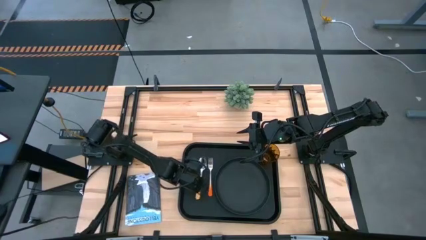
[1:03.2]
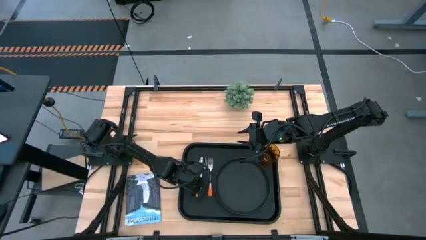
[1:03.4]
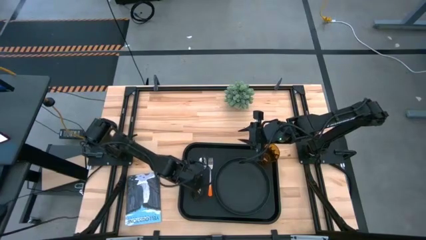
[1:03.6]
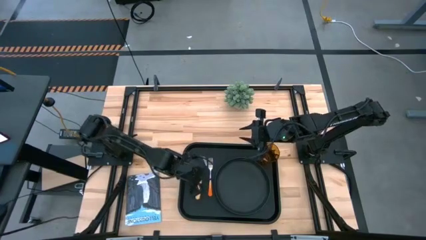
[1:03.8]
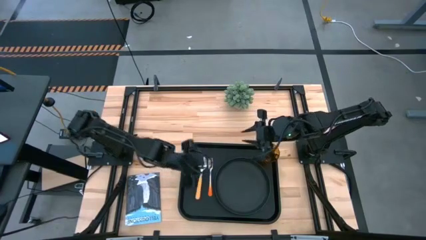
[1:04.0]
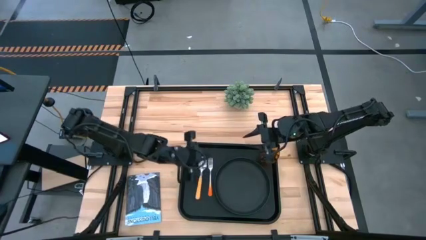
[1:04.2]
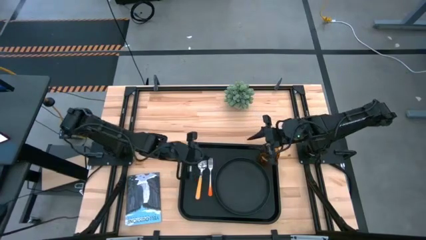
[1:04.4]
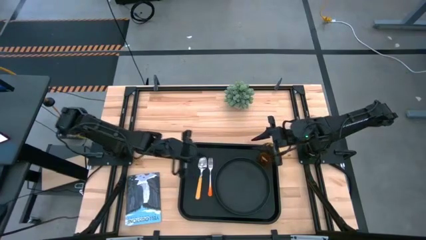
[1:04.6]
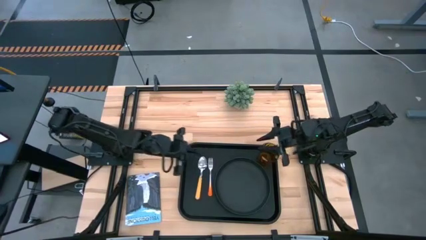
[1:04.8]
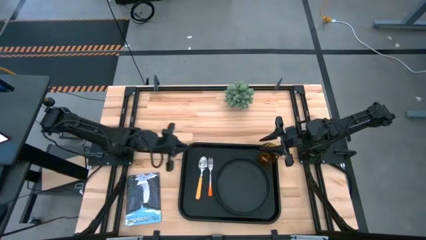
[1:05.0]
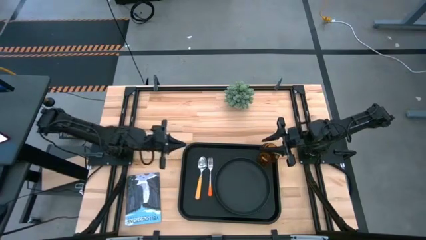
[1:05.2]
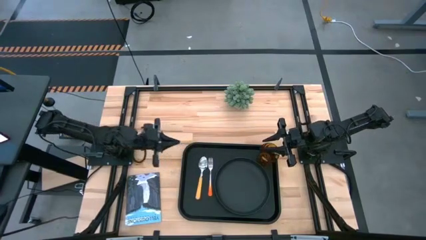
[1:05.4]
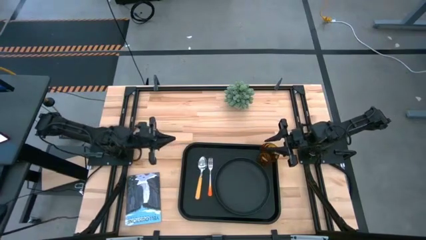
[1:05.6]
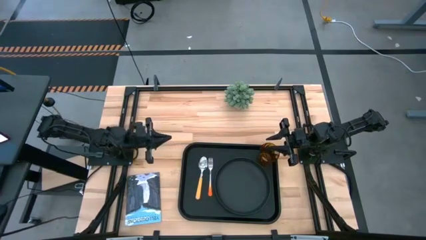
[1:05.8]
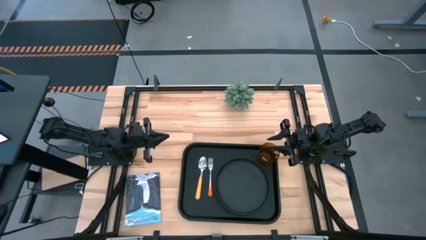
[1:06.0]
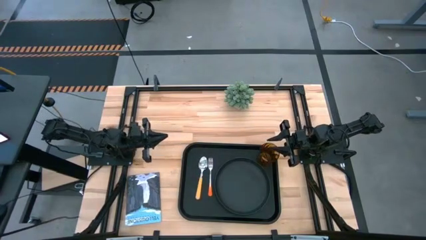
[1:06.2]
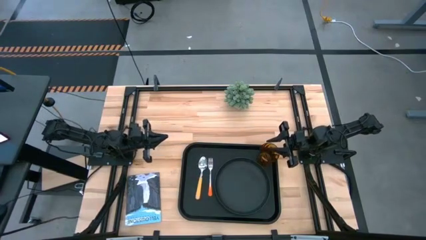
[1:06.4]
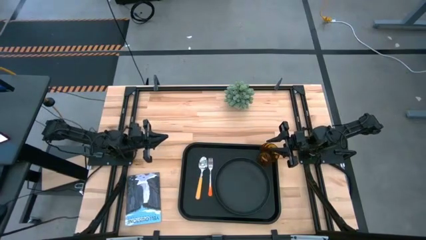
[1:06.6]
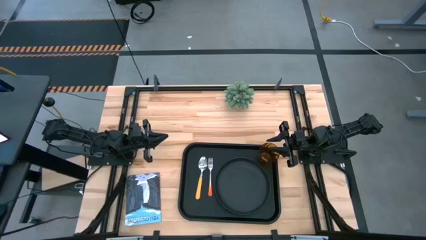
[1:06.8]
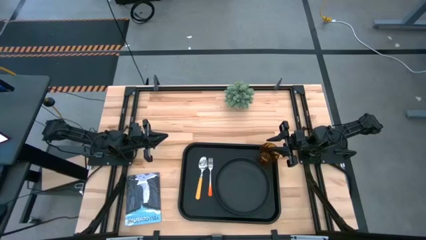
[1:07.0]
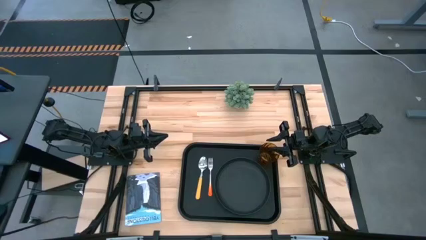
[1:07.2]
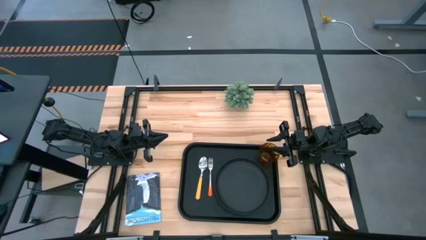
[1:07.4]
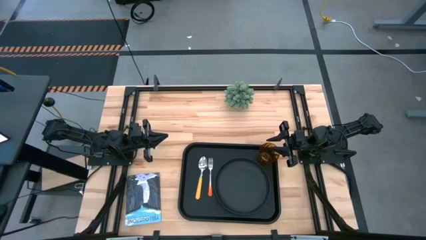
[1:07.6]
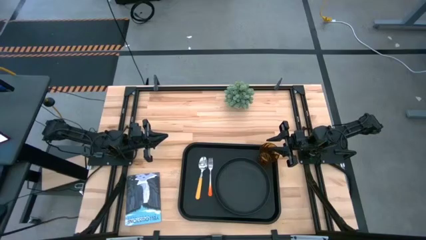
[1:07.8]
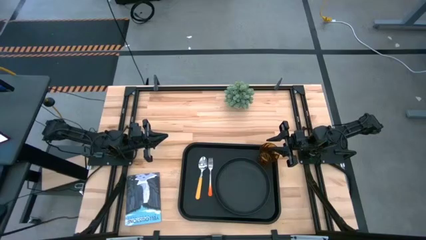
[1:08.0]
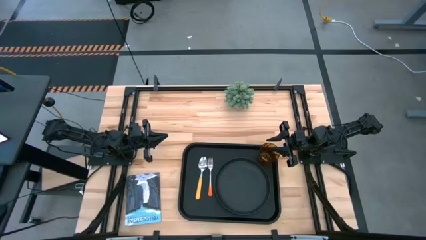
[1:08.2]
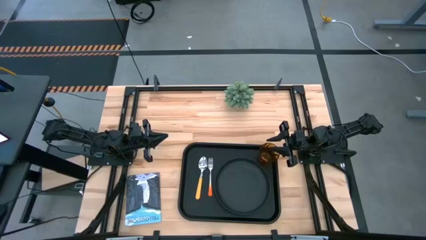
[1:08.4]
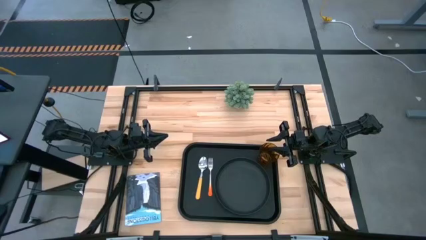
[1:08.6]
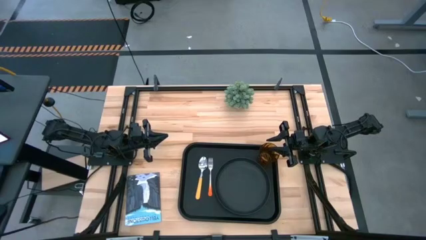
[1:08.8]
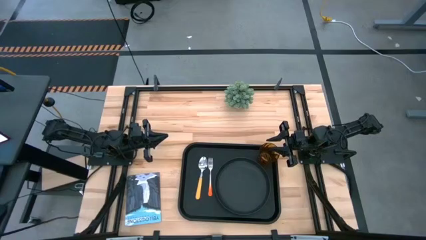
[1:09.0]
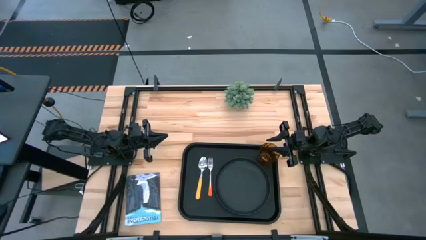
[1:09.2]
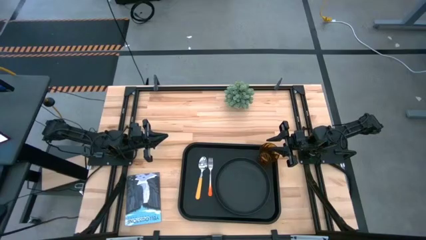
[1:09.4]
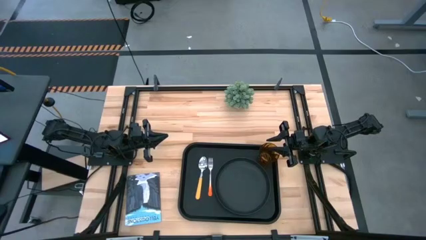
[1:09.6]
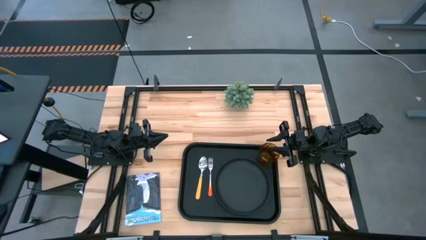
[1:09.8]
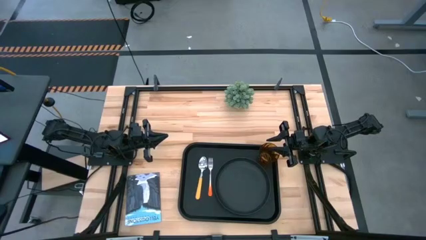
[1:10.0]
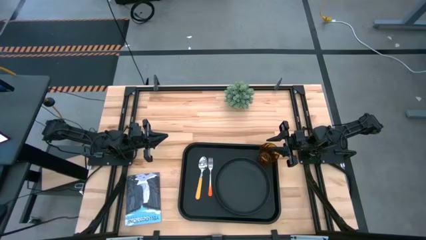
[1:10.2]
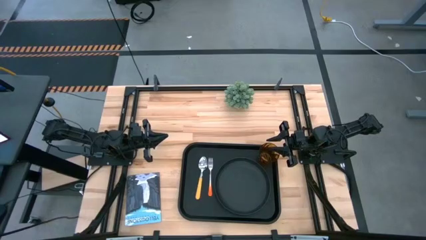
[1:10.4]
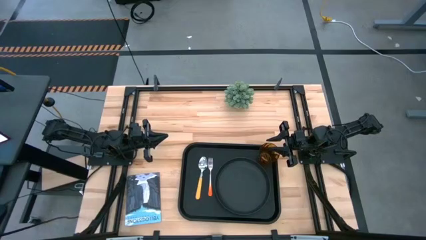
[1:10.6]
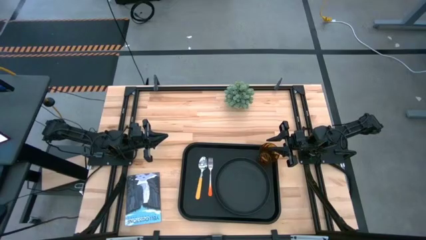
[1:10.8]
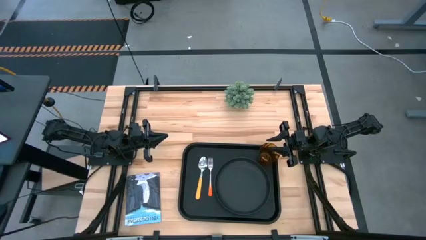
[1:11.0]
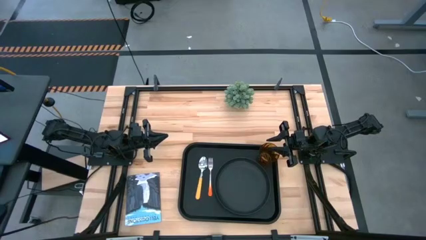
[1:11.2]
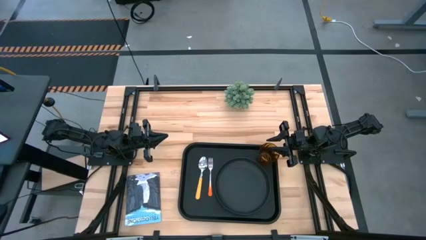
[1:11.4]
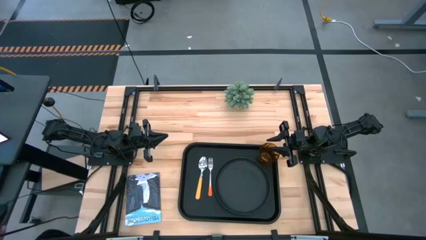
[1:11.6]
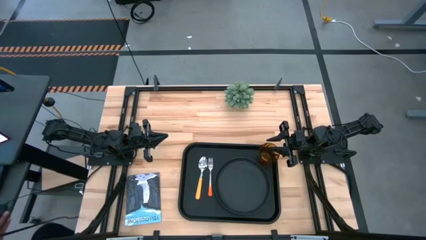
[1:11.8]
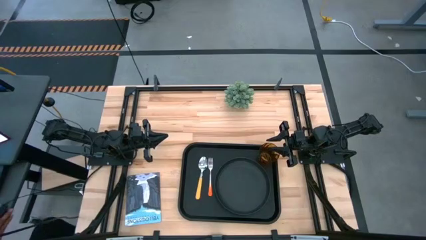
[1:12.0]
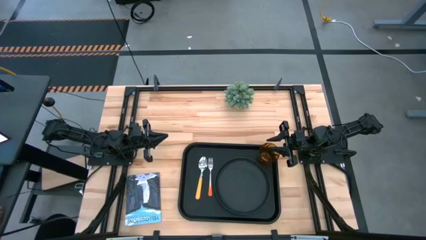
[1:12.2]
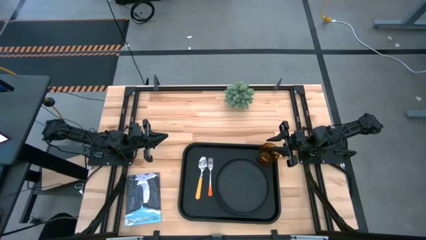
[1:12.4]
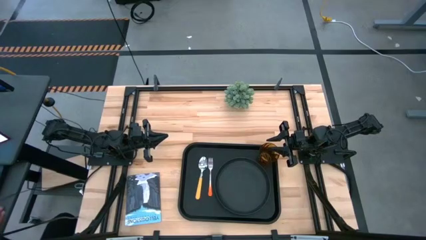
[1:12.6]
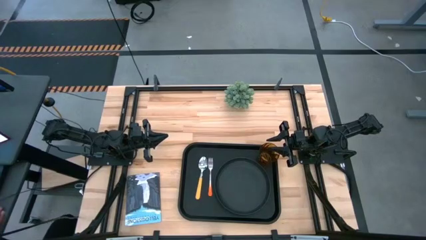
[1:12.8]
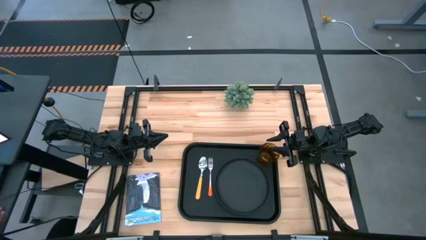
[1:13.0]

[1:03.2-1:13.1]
Task: Pick and place plate/cup/fork/spoon on tray
Return to home position

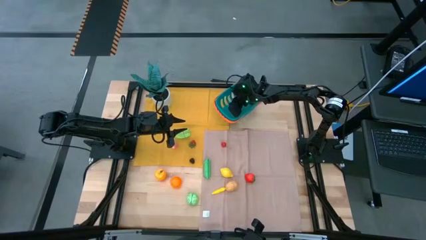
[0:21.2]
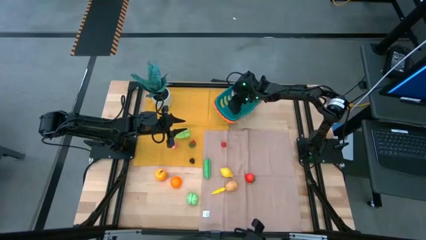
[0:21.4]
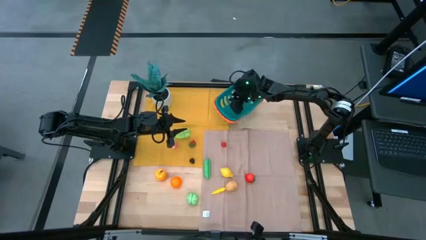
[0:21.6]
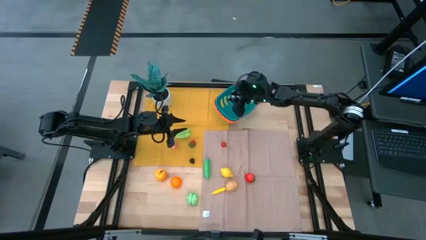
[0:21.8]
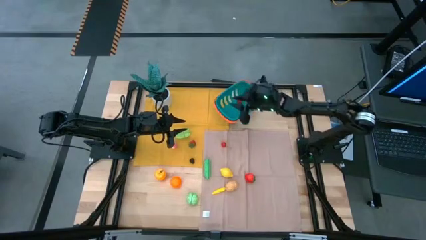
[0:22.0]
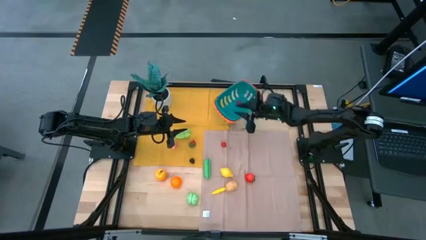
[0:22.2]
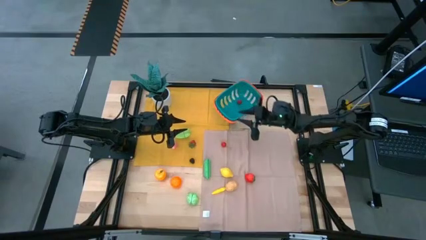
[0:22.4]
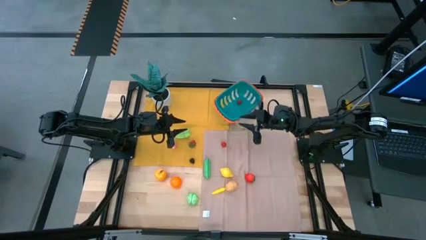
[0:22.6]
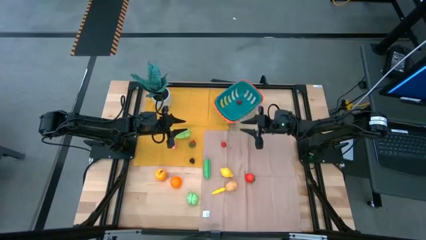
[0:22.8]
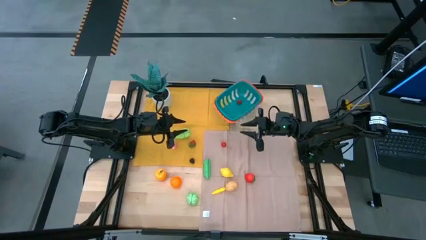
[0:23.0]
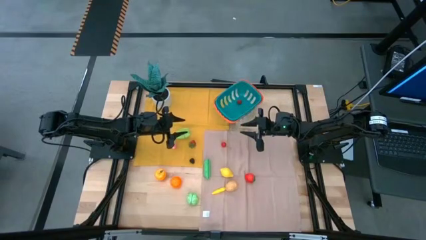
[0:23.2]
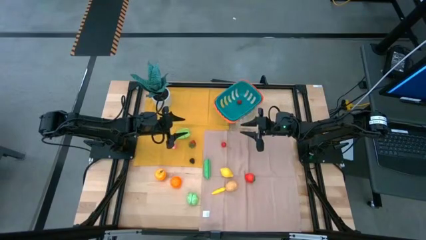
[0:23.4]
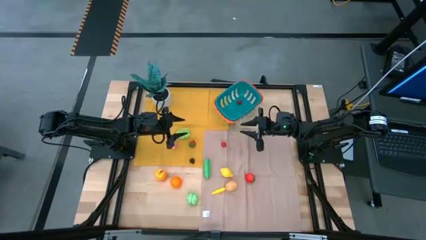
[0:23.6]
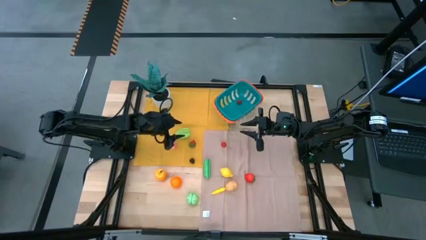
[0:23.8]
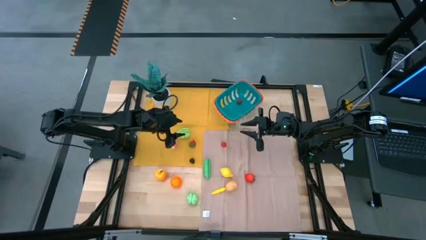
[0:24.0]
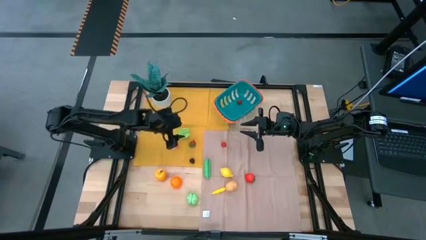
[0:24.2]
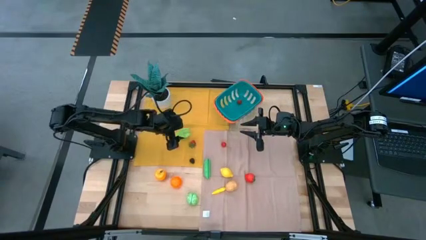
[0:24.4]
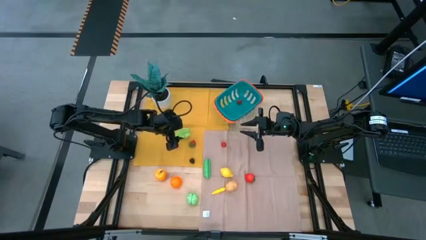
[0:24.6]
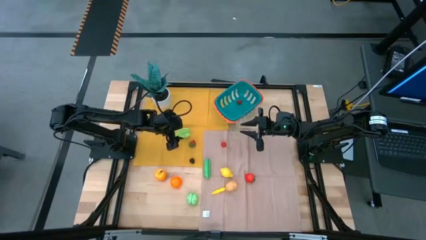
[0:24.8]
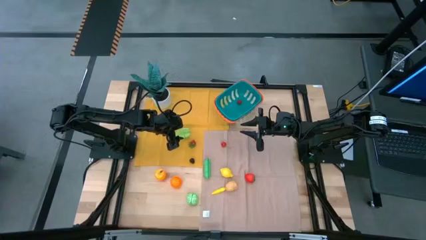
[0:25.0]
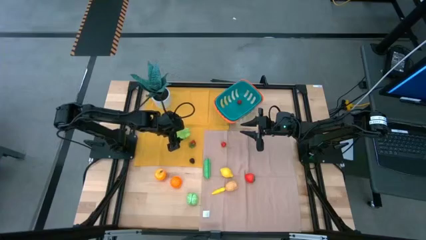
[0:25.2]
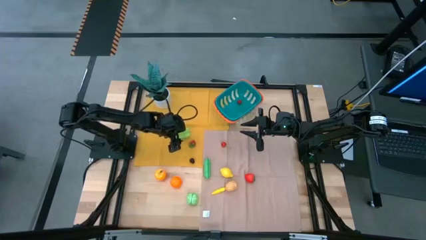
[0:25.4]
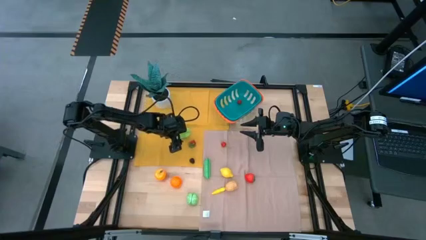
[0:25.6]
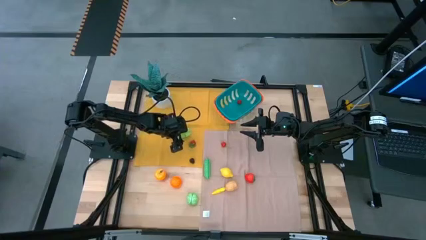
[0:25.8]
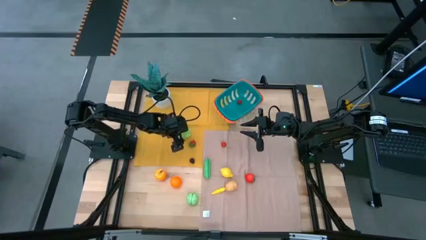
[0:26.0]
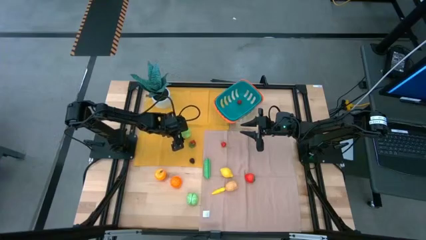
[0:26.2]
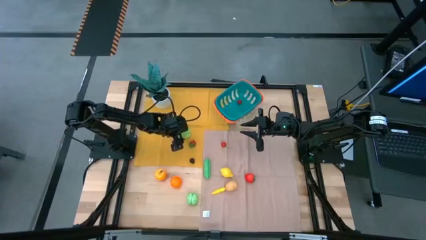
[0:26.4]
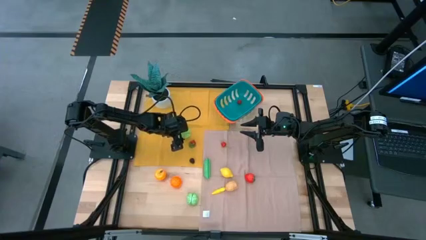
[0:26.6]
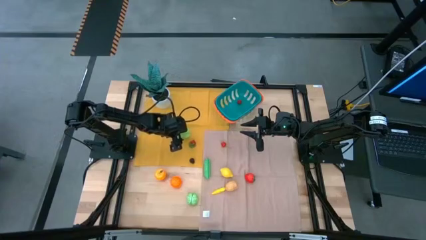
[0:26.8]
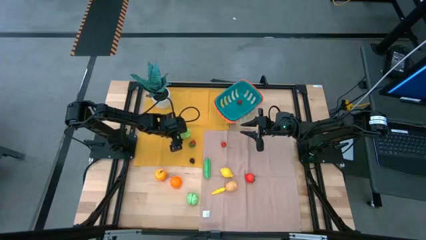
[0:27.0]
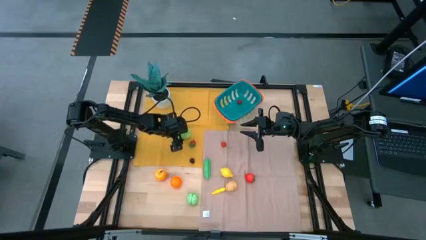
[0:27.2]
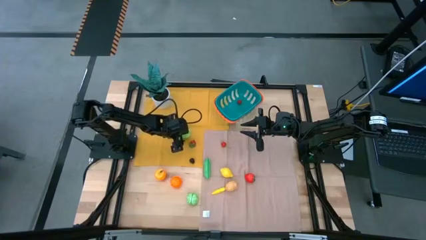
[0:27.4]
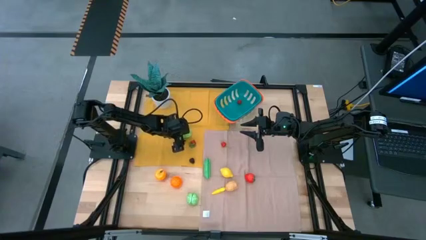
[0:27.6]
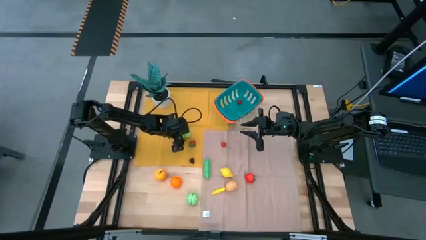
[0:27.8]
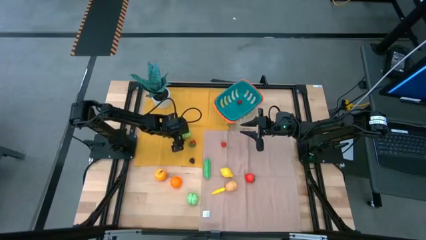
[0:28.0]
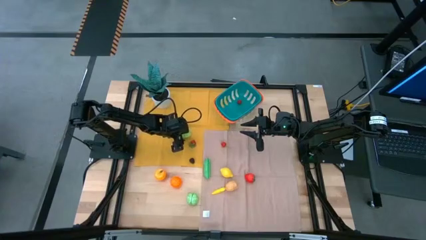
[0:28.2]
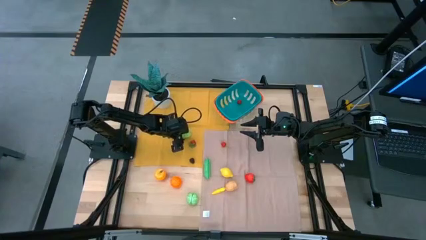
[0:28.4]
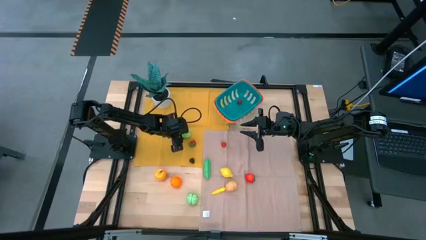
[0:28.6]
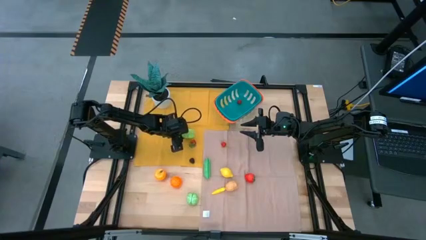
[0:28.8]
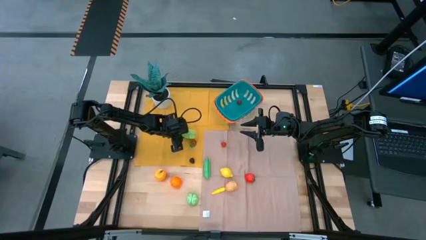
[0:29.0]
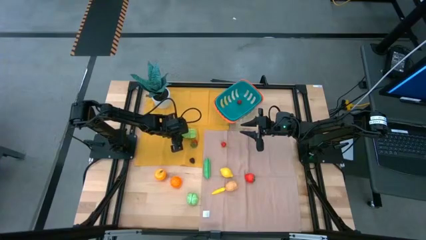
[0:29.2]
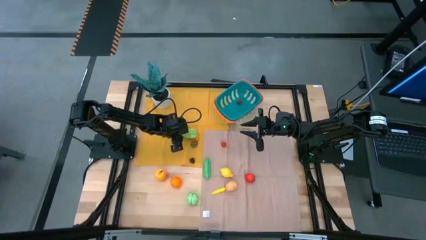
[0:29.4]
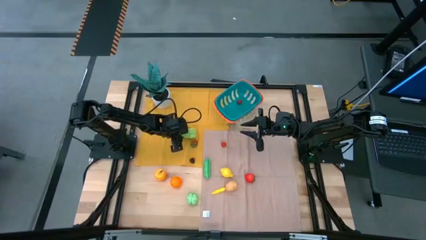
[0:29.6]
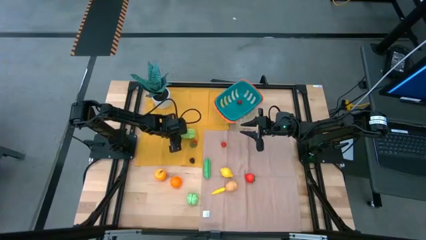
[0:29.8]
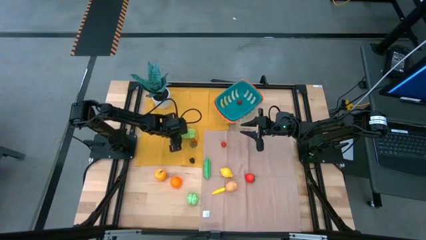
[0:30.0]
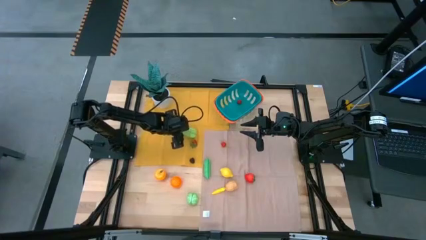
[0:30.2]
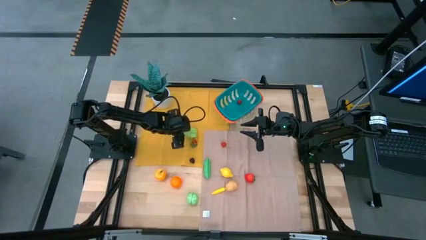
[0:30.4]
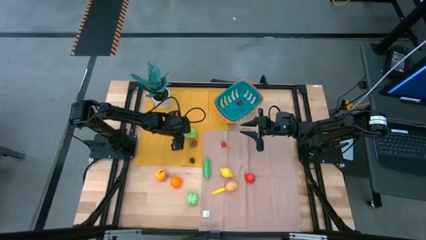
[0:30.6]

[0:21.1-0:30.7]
Task: Pick and placing Produce into tupperware
Put the starfruit into the basket
